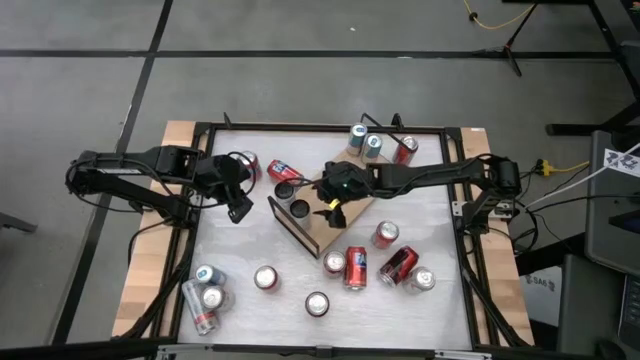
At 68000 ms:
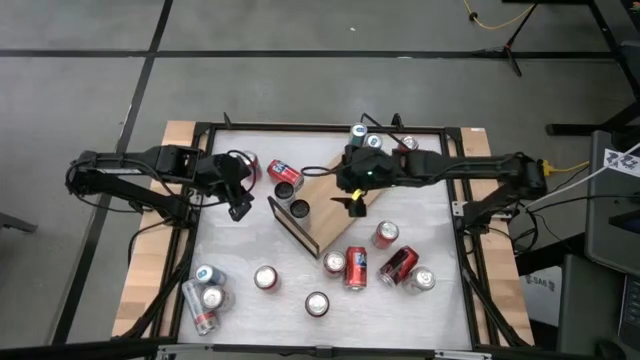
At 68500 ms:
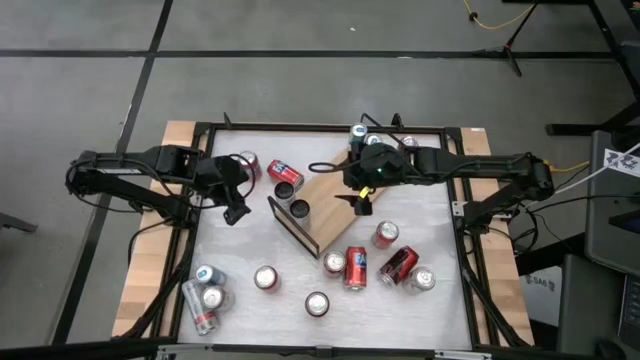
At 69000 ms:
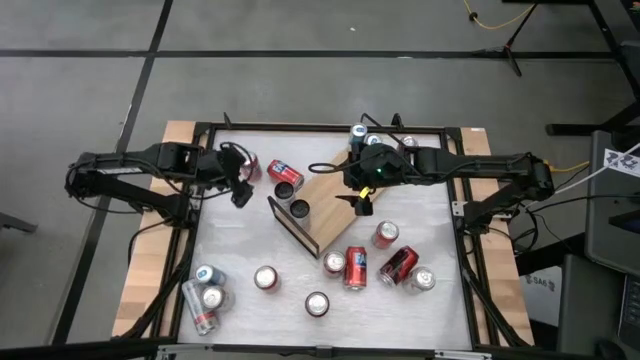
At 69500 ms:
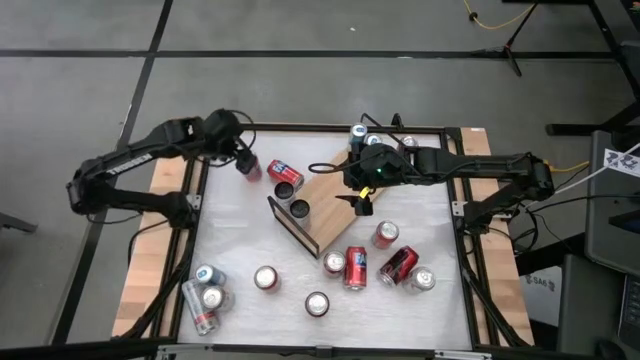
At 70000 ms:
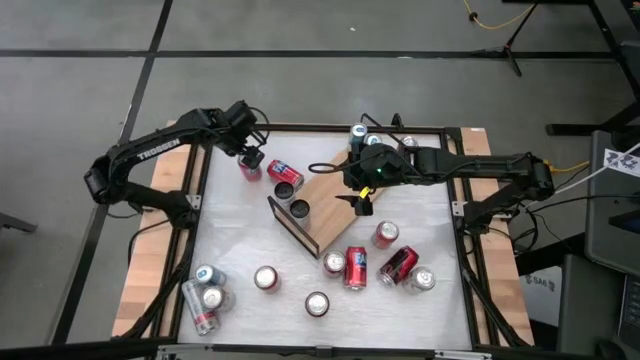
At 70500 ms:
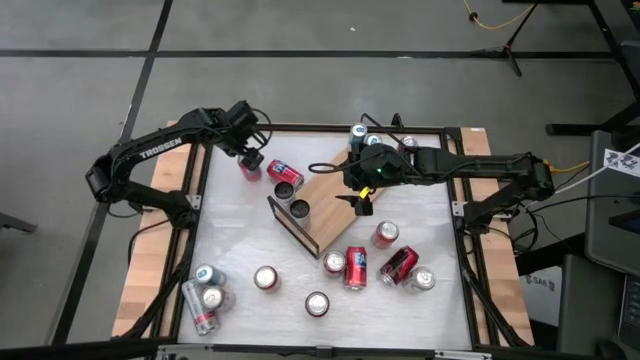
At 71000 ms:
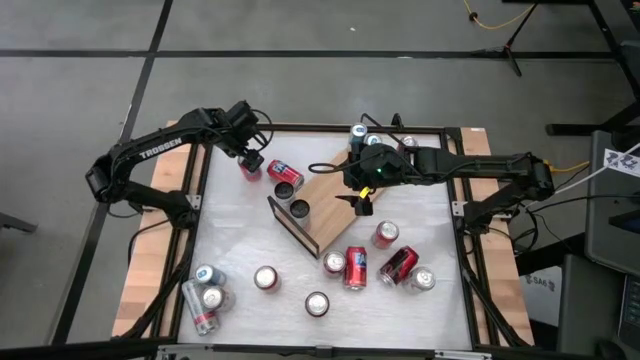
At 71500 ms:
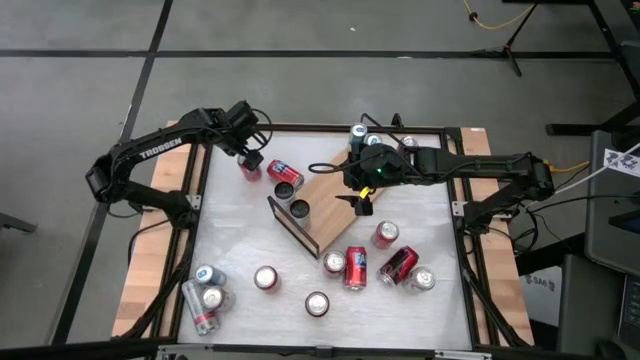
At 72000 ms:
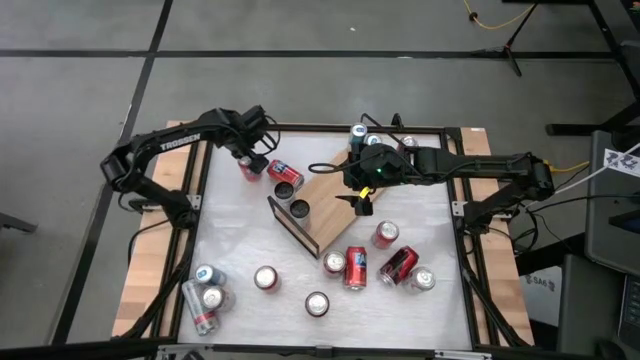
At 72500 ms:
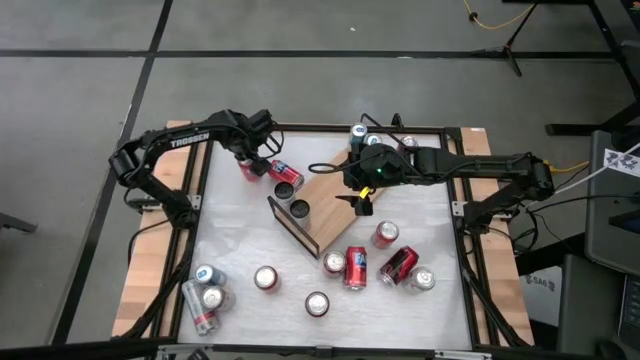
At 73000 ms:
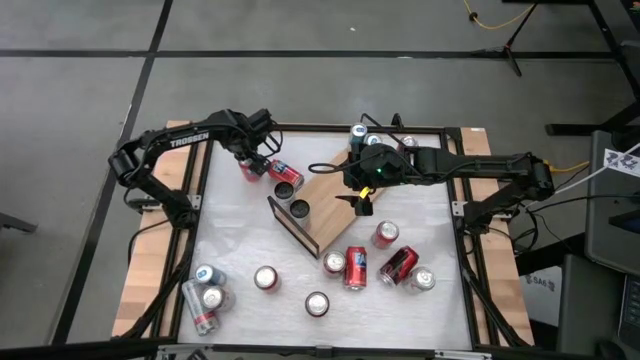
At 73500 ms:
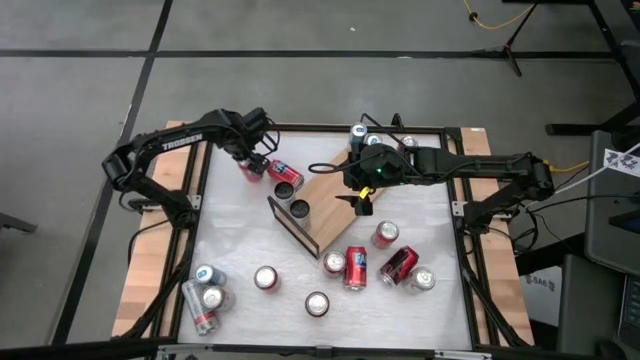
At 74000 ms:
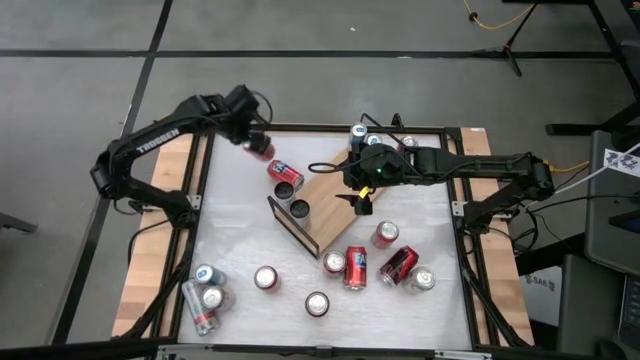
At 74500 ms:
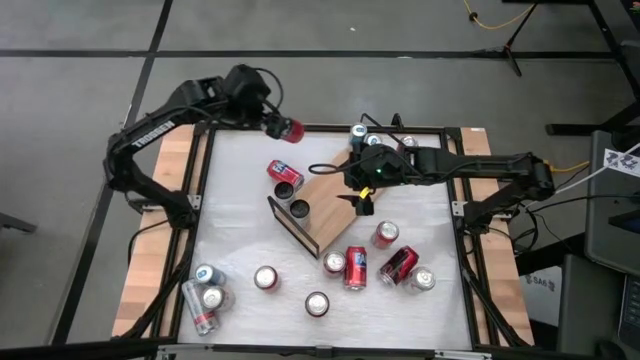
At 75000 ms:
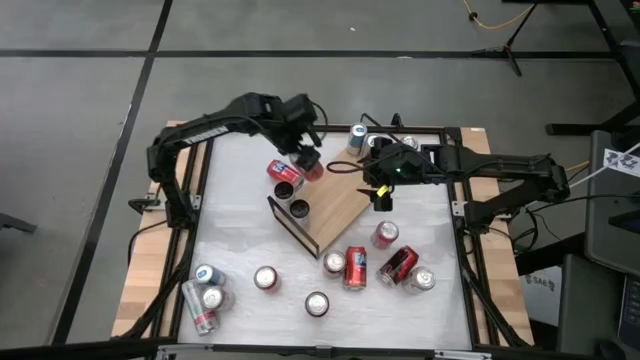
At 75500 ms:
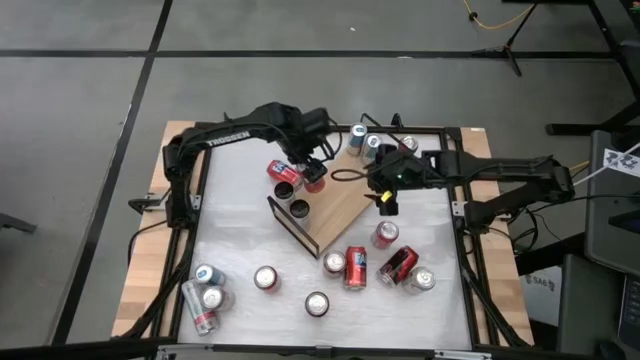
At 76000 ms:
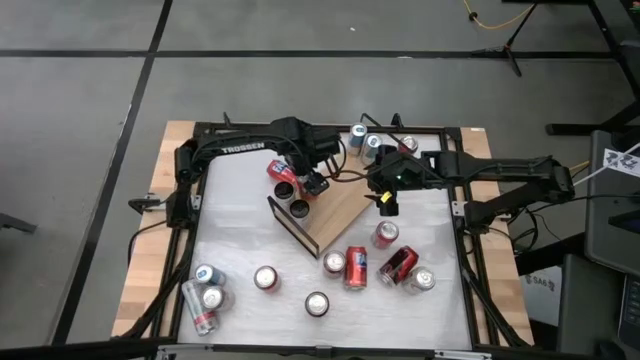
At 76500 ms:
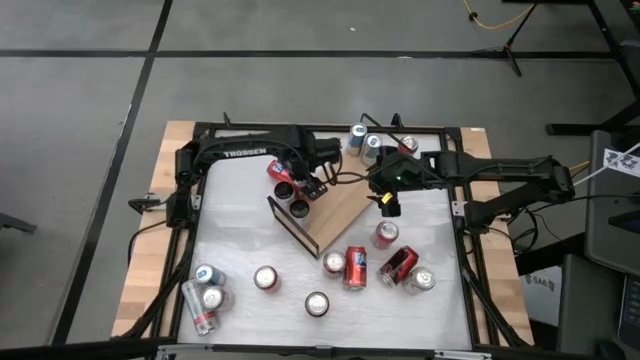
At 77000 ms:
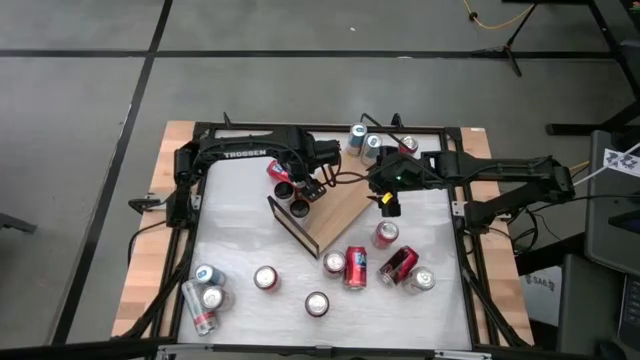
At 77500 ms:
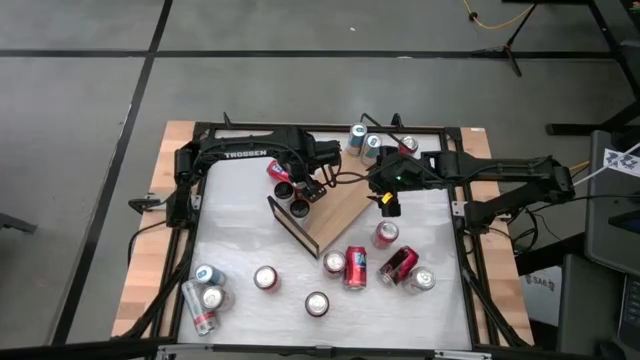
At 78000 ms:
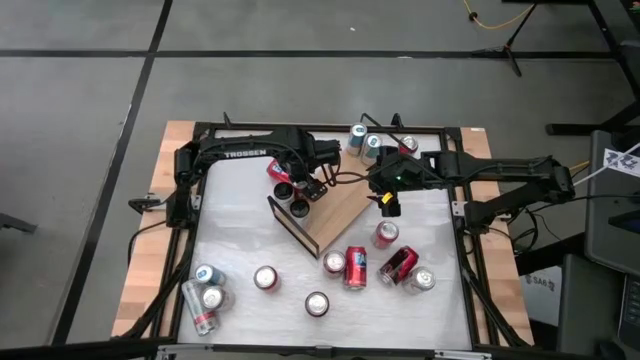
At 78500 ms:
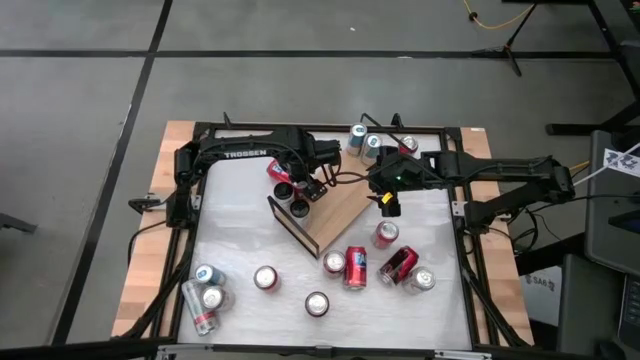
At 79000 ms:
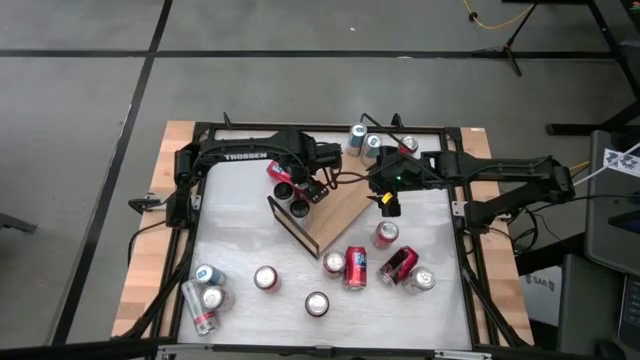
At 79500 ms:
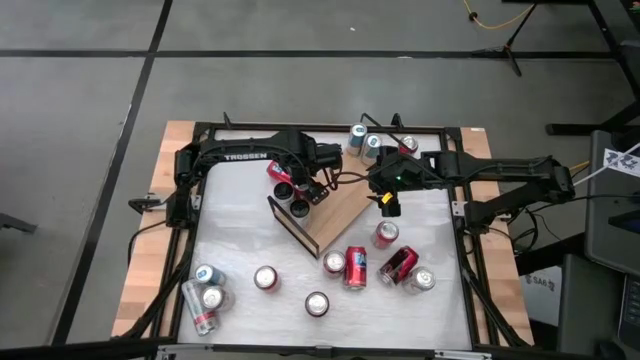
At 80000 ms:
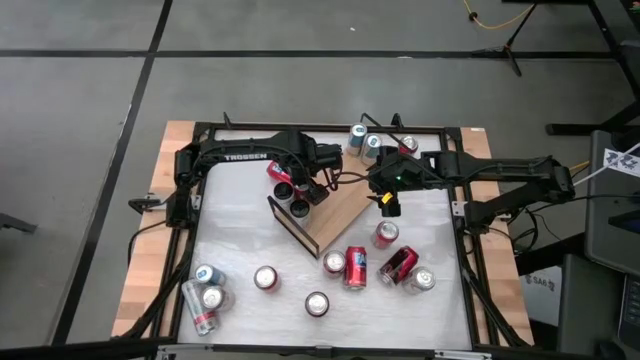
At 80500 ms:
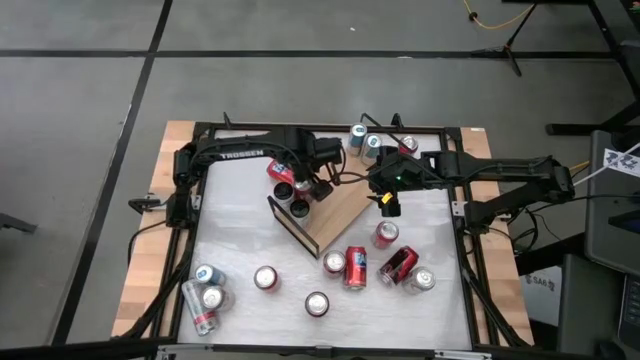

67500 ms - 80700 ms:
Task: Place canned beverage on shelf
Put the orange soda can on the shelf

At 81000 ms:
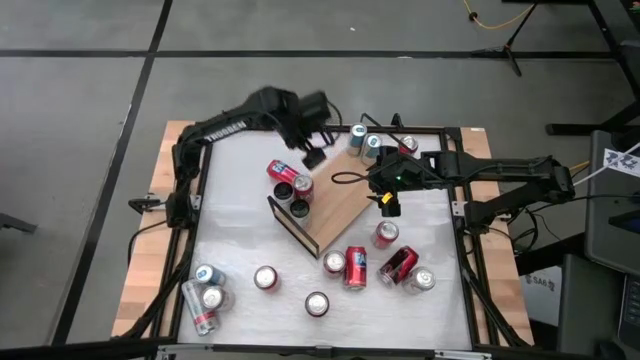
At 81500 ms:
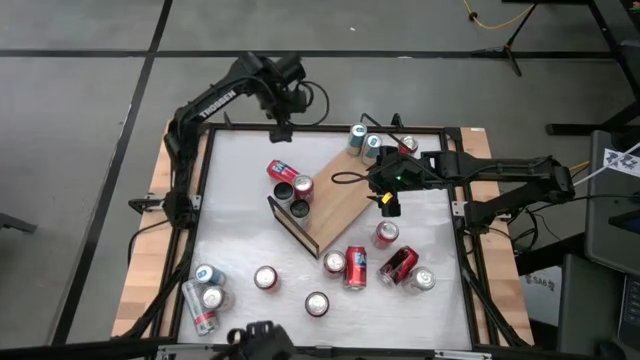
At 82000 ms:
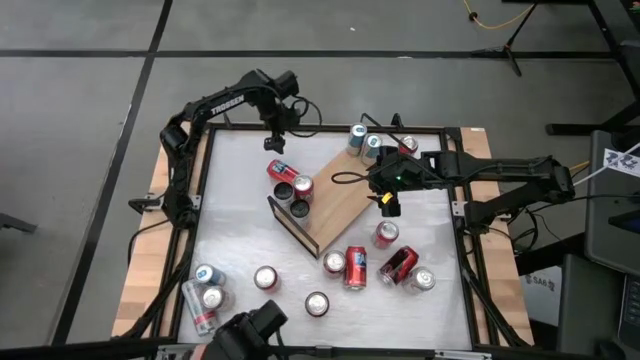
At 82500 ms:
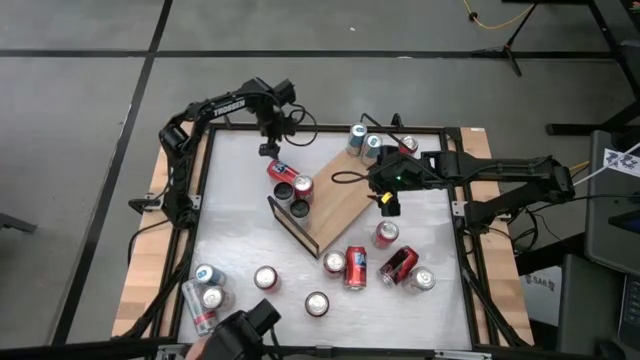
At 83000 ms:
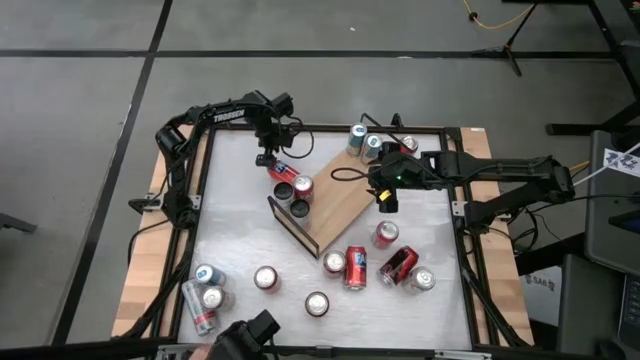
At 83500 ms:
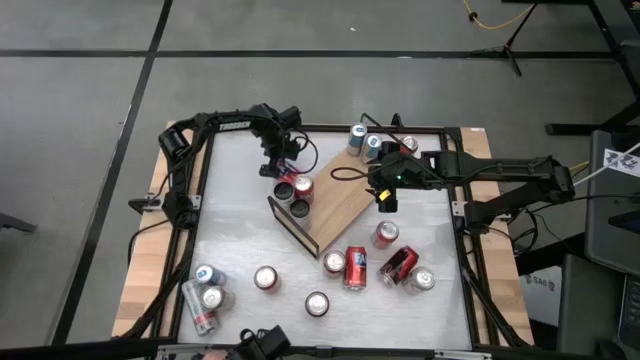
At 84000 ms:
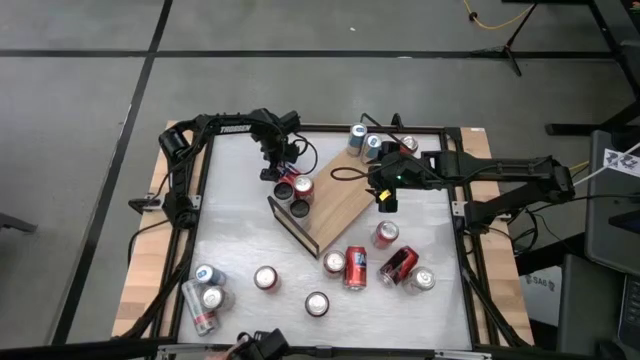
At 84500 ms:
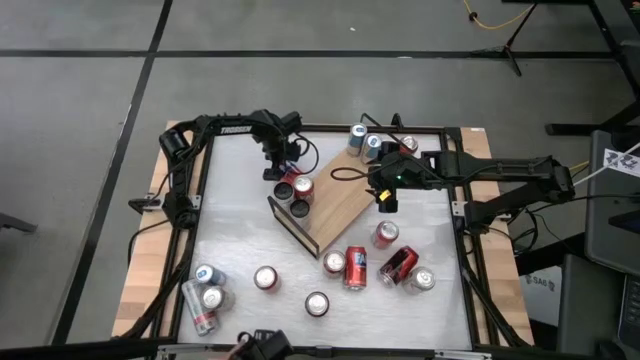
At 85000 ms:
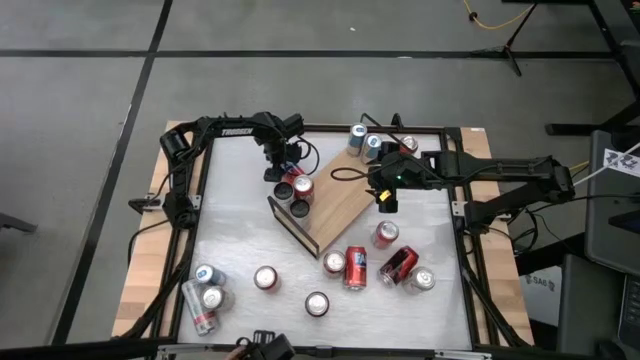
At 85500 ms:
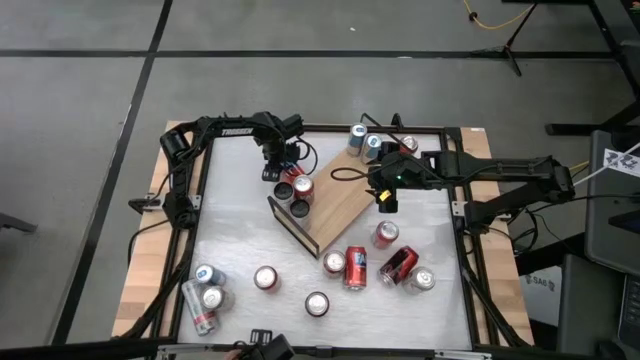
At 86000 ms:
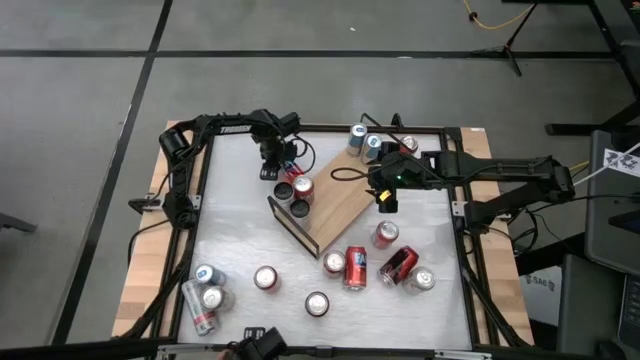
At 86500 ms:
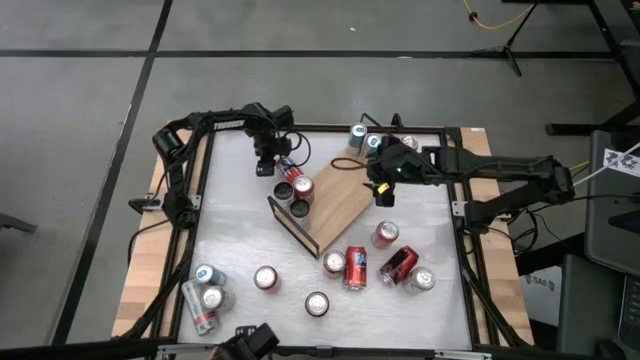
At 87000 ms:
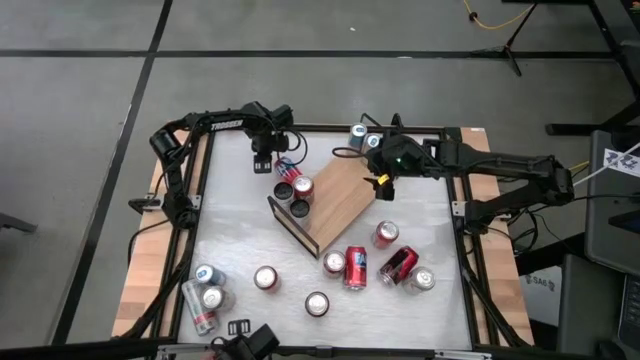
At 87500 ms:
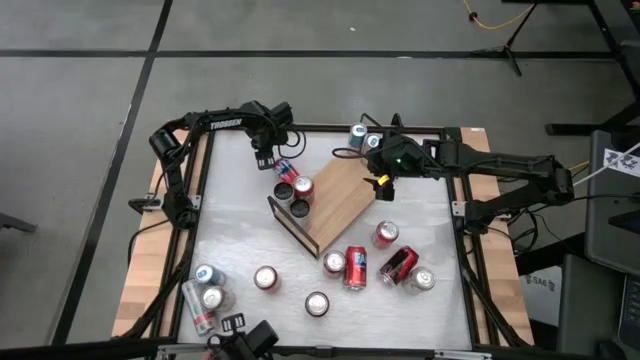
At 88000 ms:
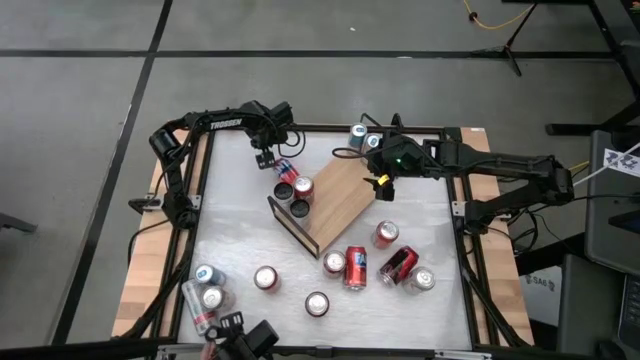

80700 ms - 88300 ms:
Put the orange soda can on the shelf

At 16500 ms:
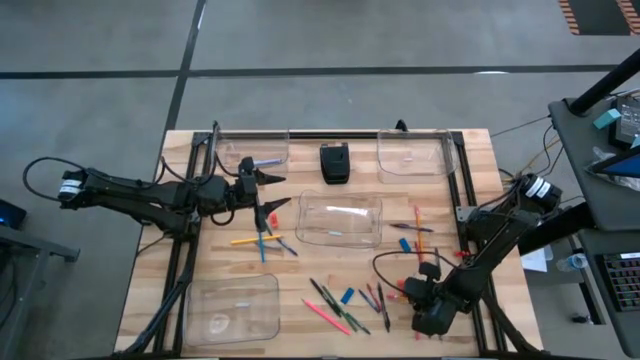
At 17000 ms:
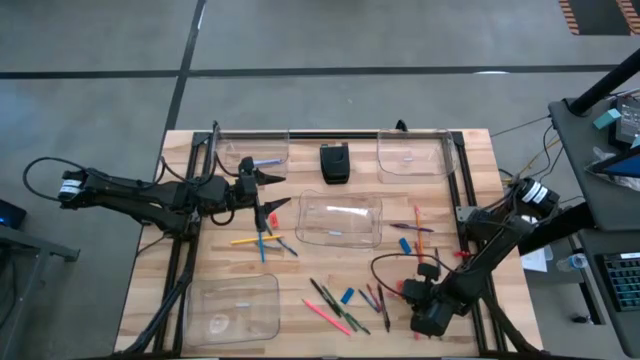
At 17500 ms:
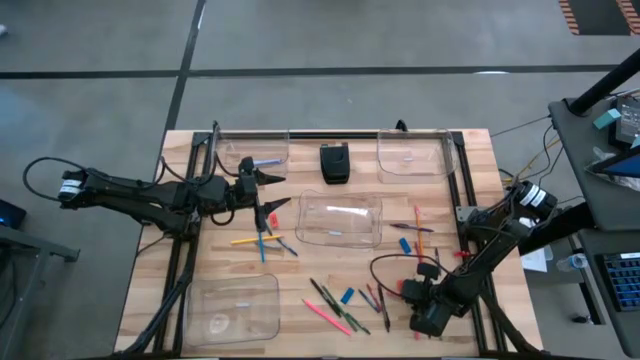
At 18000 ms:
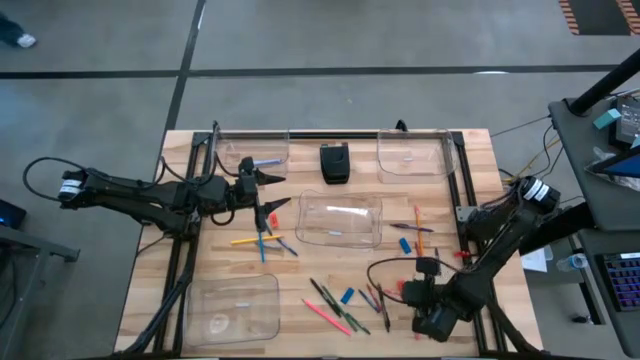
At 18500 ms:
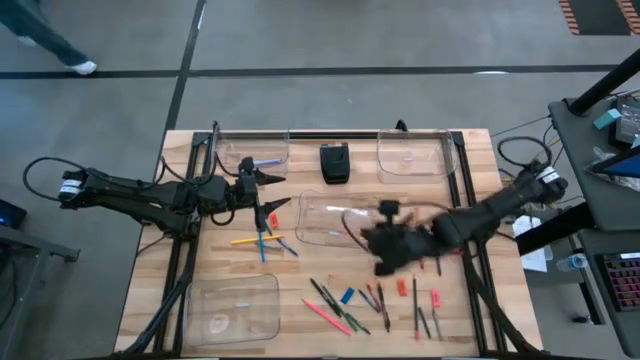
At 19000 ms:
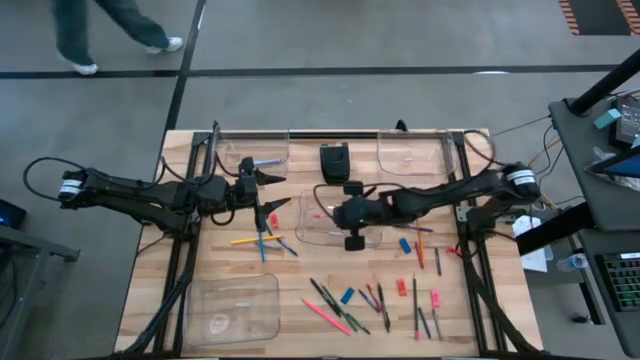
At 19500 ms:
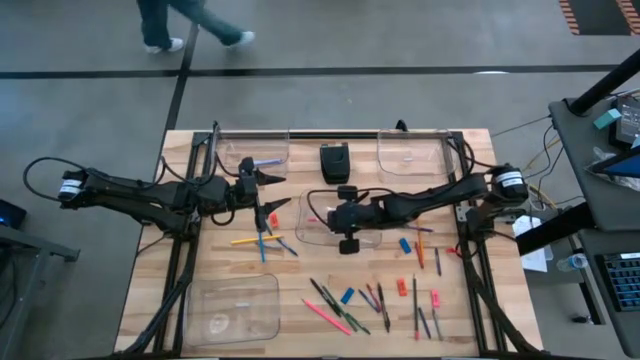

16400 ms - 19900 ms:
Task: Sort crayons/erasers/pens/pencils in bins
Put the orange pencil into the middle transparent bin
